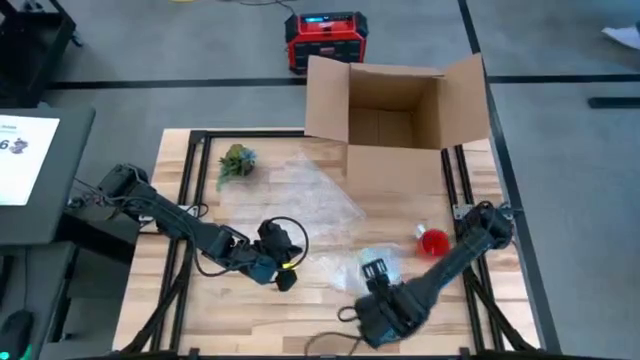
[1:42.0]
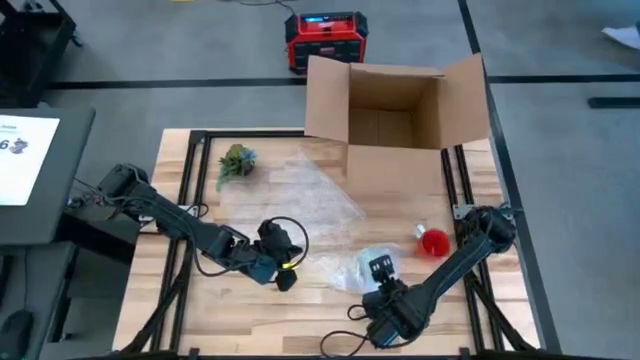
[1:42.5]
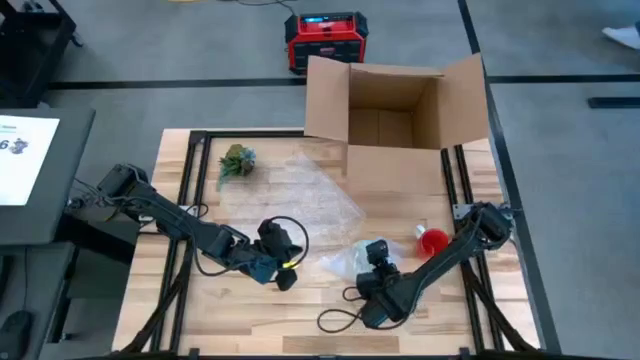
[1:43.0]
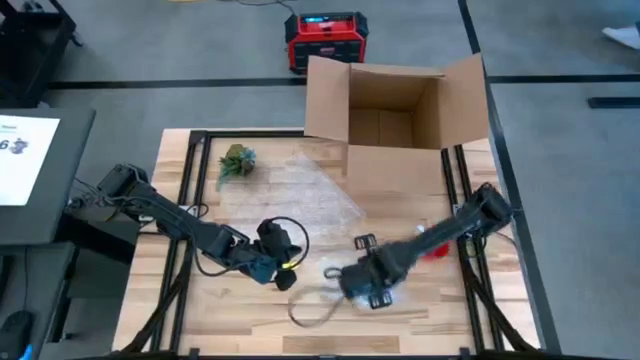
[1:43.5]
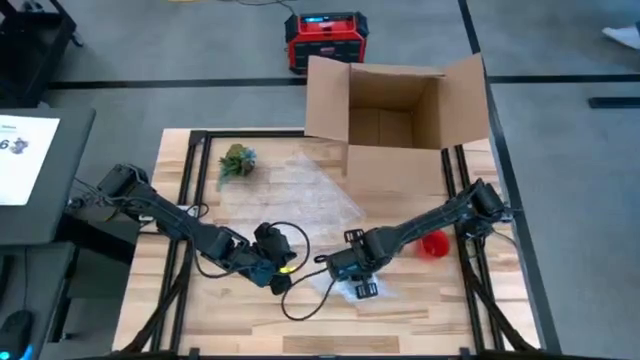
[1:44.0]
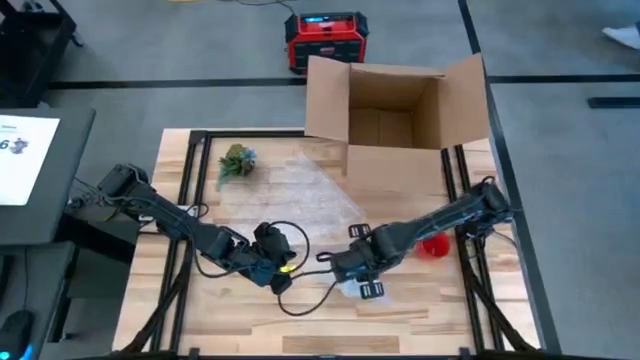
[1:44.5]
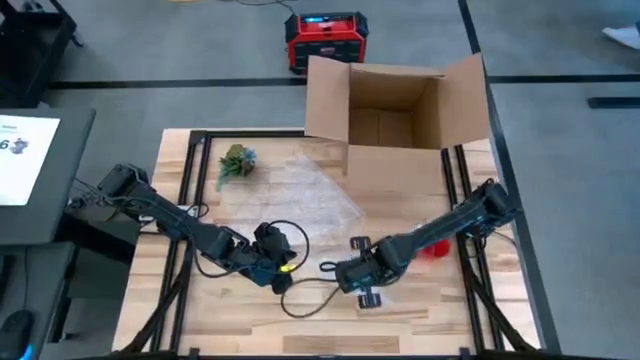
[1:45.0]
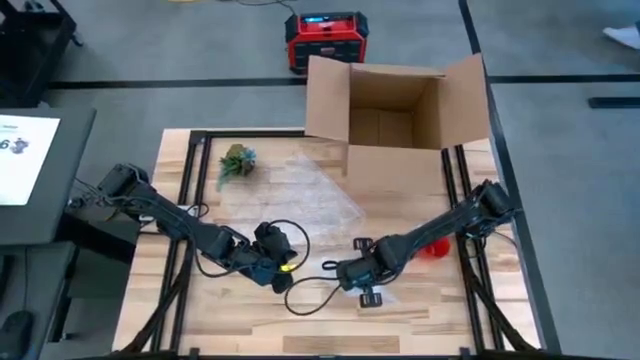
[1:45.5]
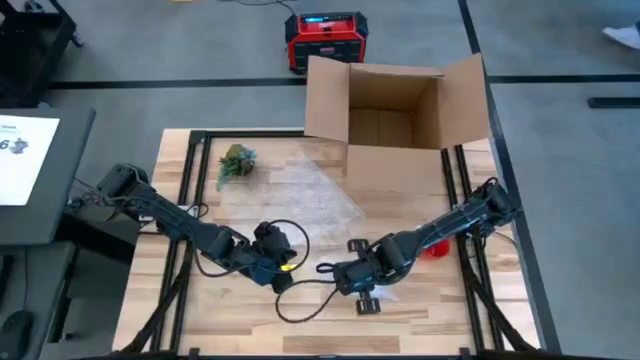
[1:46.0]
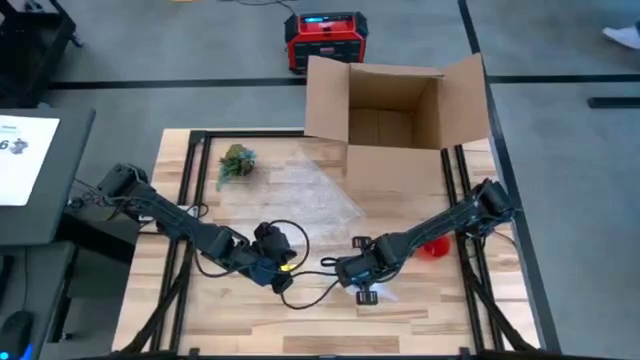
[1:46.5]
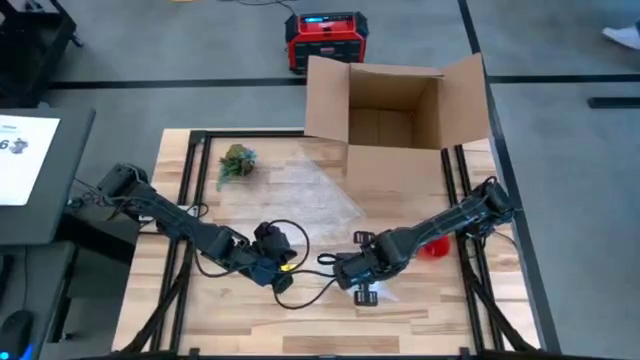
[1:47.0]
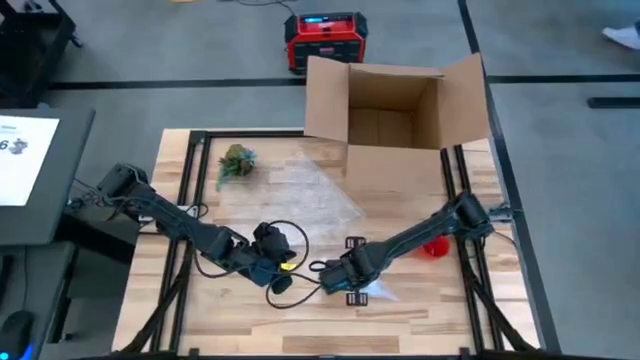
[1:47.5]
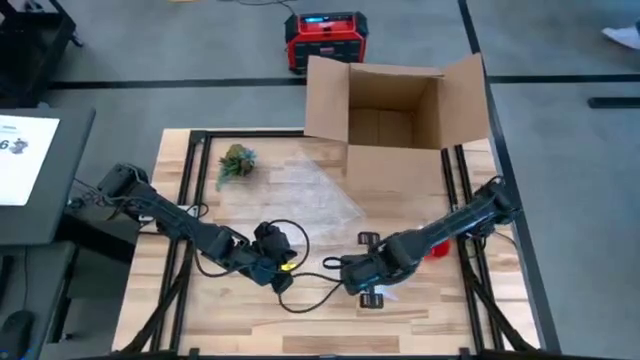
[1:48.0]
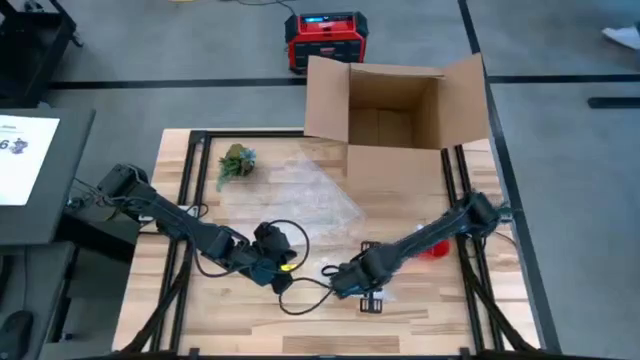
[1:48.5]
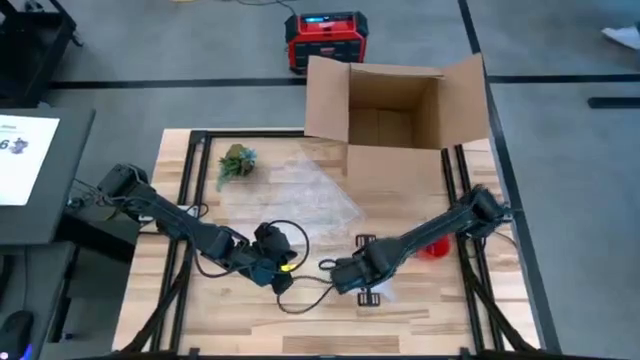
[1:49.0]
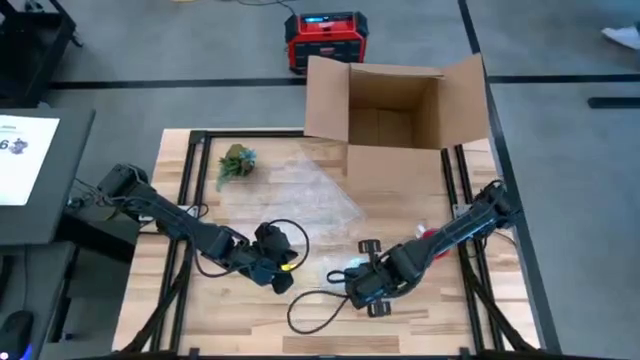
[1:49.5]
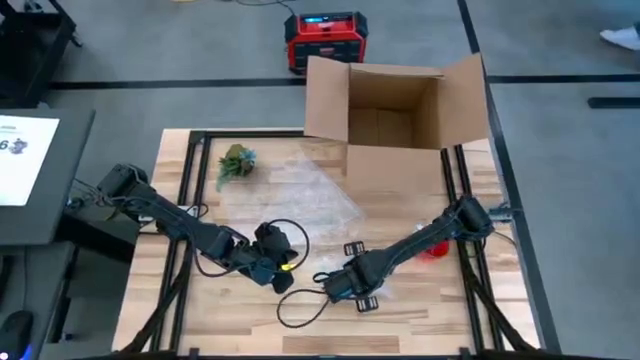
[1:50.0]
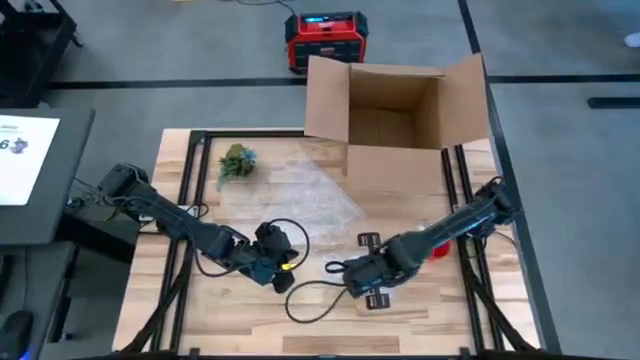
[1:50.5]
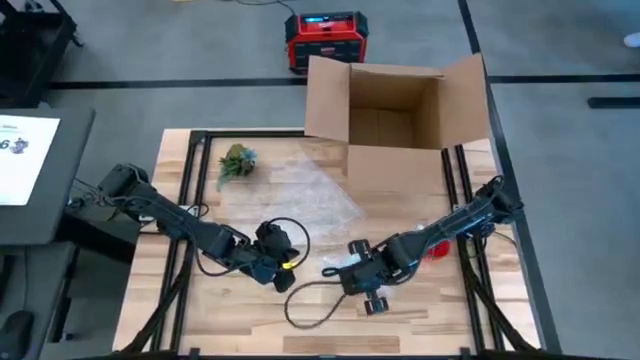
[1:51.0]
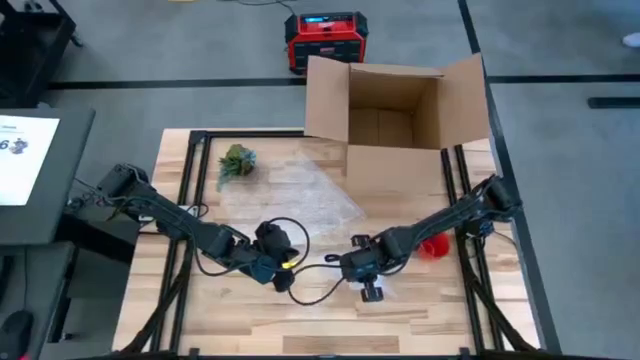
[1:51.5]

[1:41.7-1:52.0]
Task: wrap mug
Wrap the blue patterned mug with the transparent bubble wrap

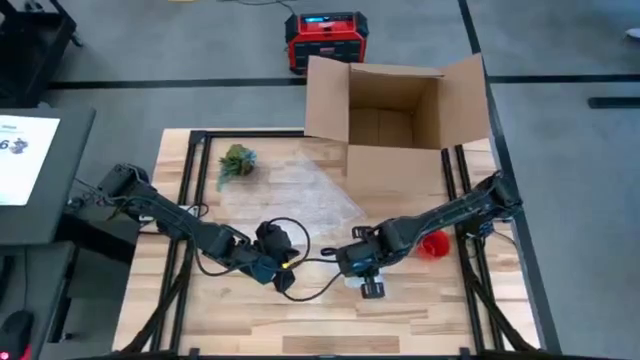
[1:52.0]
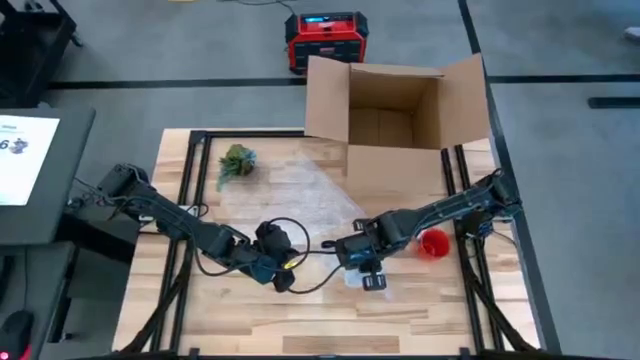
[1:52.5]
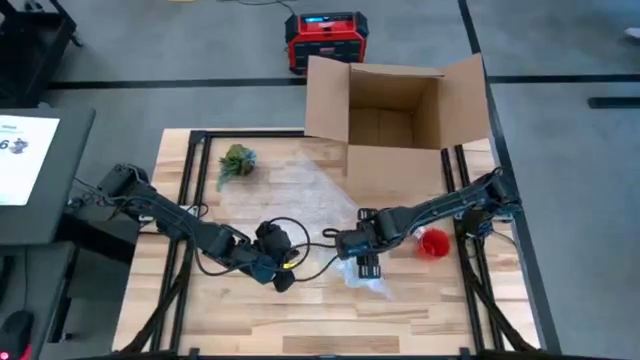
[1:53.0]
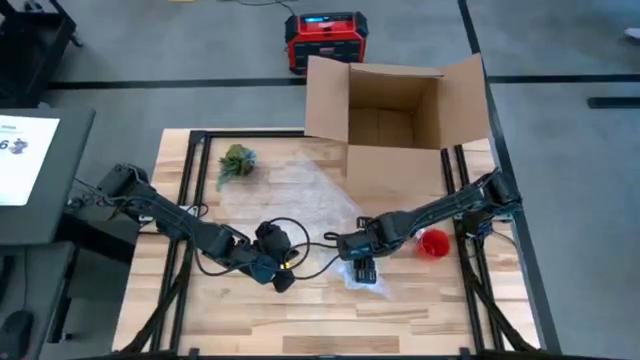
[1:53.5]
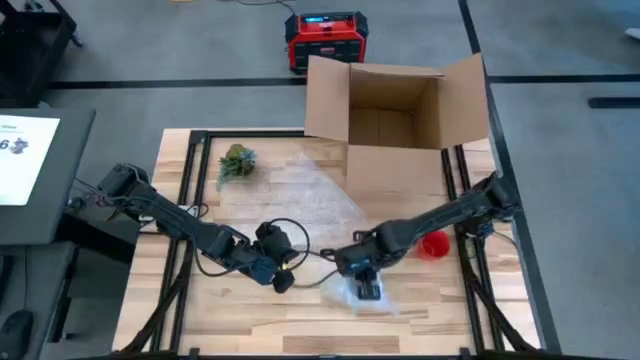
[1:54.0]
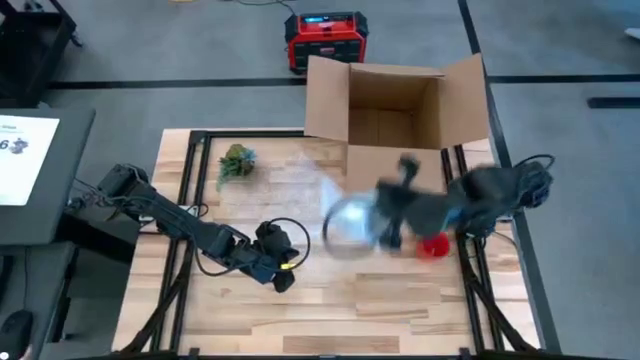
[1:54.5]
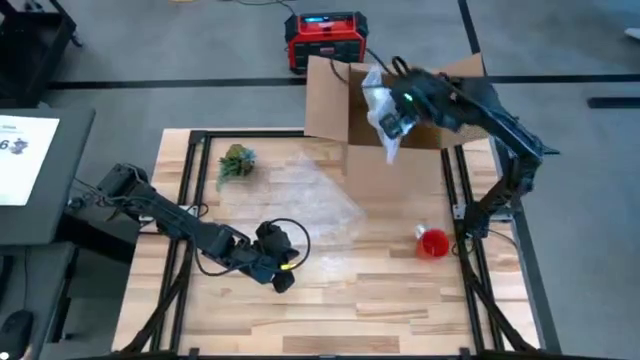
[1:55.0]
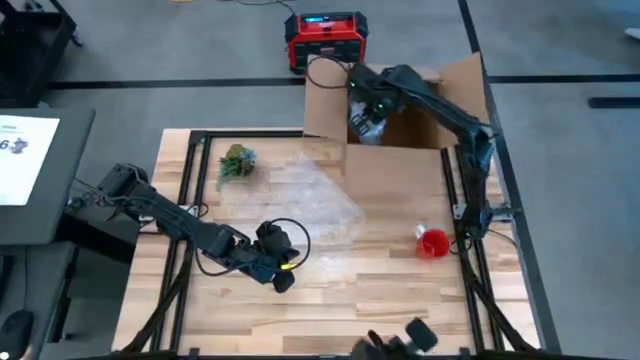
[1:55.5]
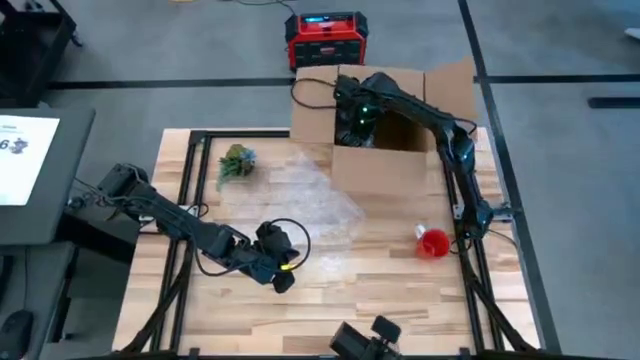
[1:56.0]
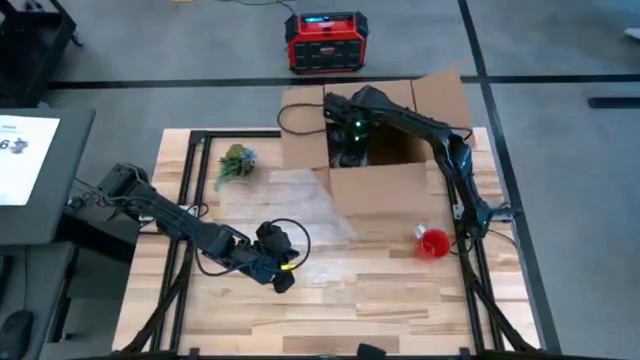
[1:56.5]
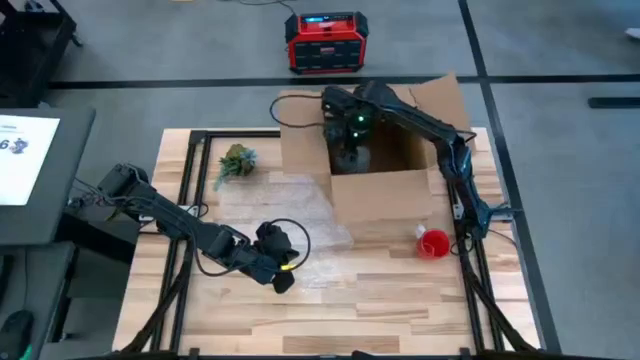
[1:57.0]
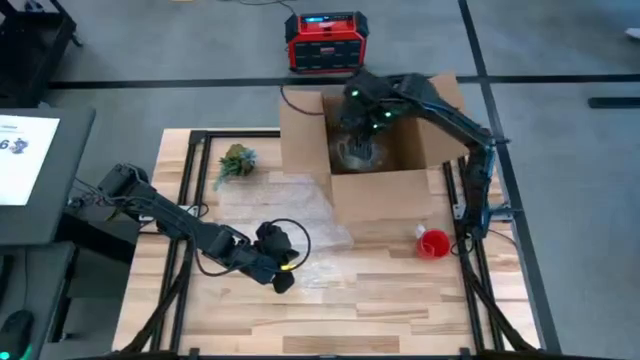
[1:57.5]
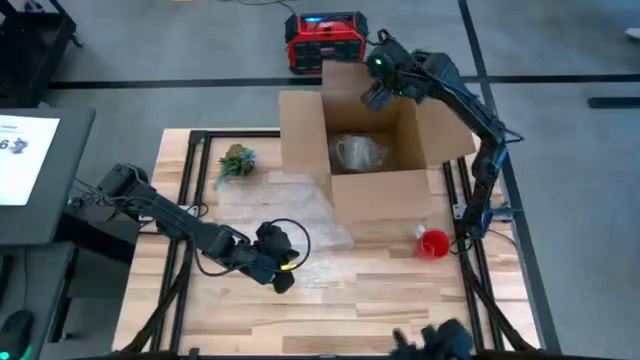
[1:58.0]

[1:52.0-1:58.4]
Put the wrapped blue patterned mug into the brown cardboard box

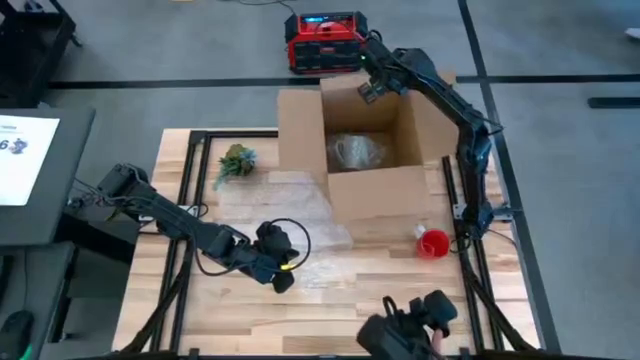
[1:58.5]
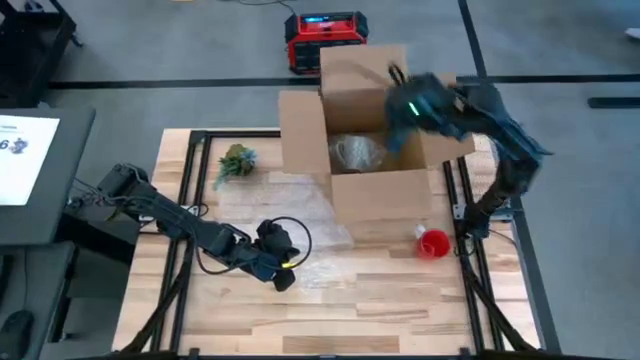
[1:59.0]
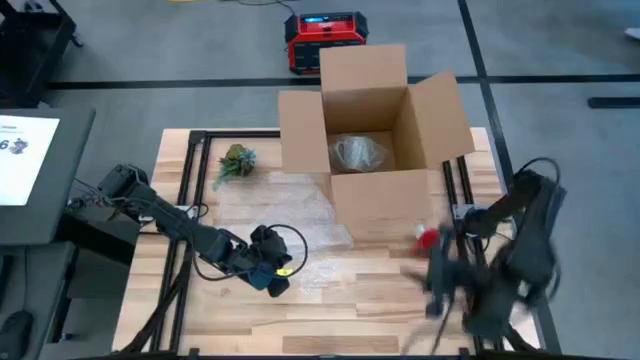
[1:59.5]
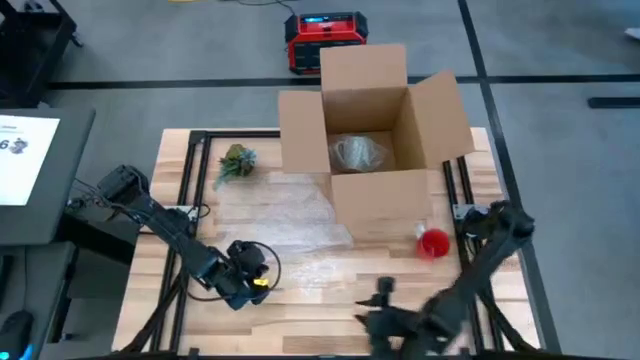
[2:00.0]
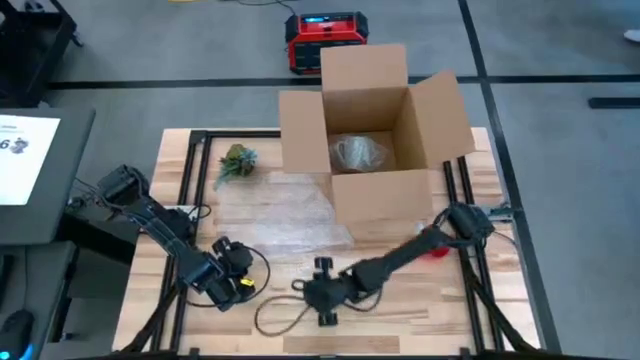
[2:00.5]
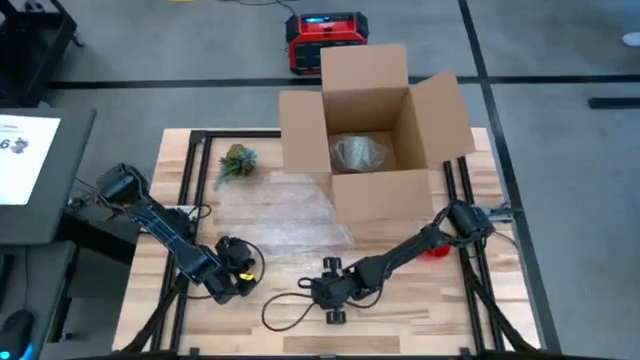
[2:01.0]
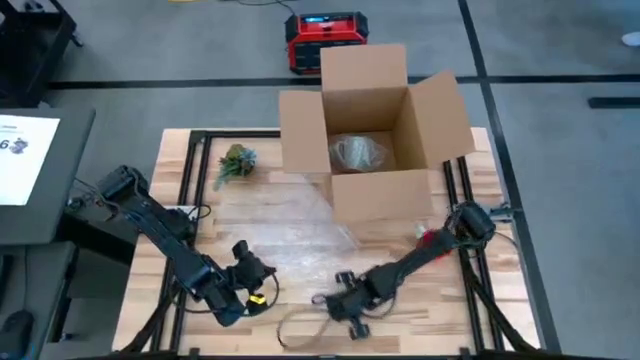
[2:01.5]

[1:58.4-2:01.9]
Prepare the transparent bubble wrap
